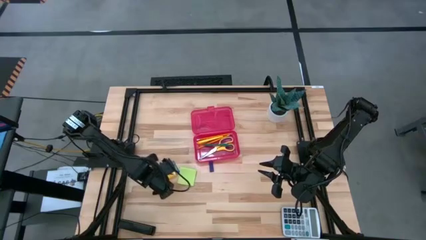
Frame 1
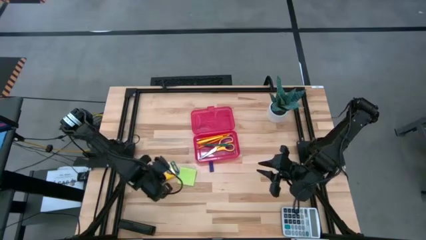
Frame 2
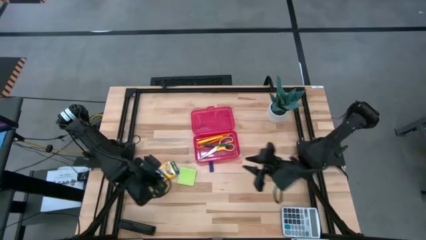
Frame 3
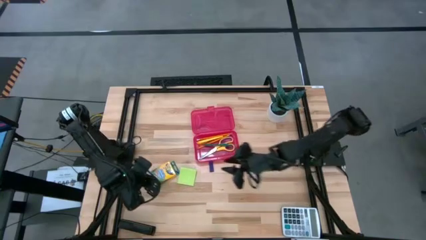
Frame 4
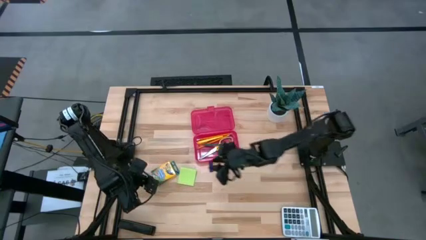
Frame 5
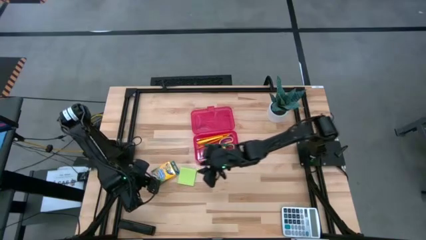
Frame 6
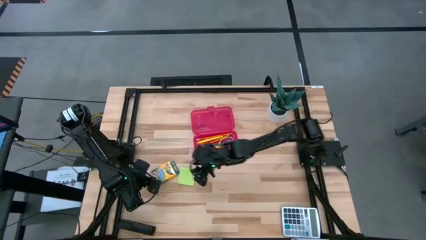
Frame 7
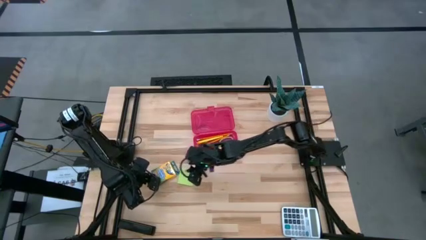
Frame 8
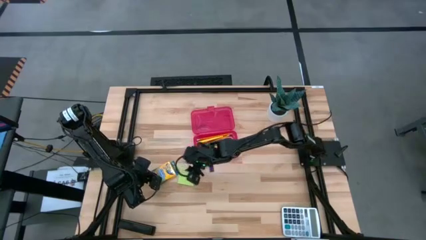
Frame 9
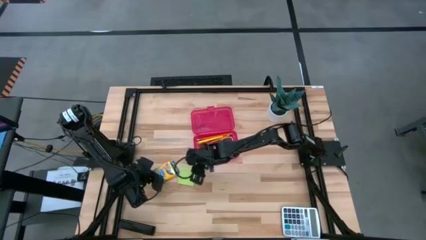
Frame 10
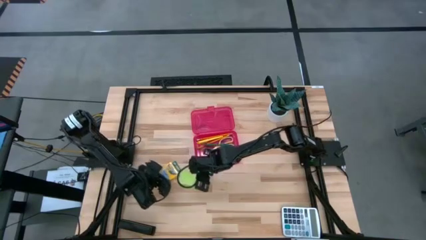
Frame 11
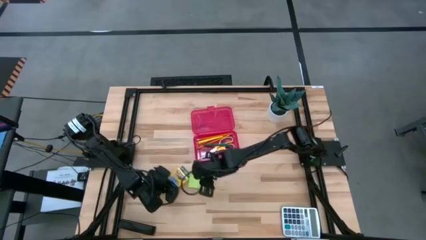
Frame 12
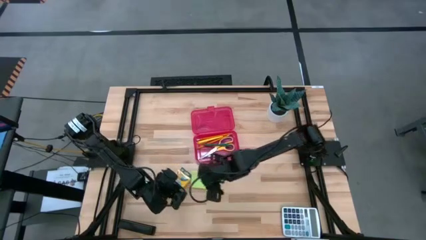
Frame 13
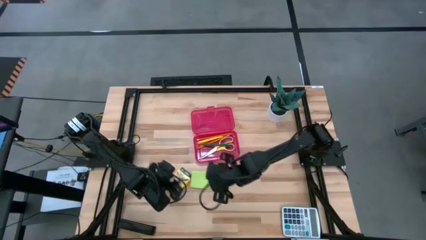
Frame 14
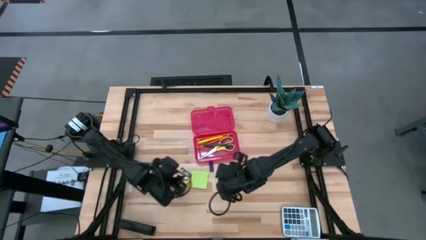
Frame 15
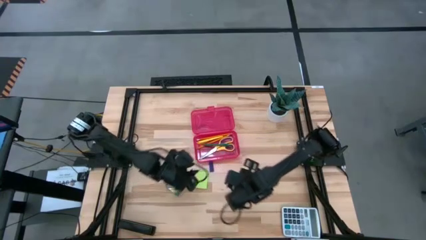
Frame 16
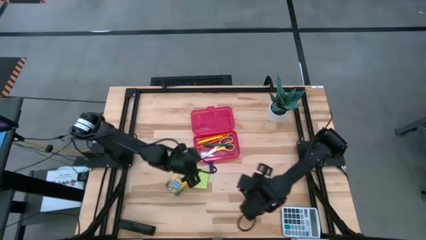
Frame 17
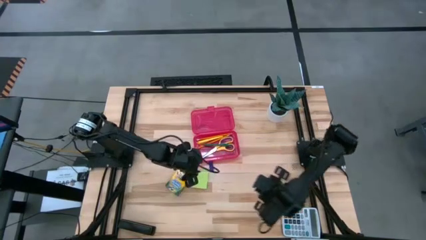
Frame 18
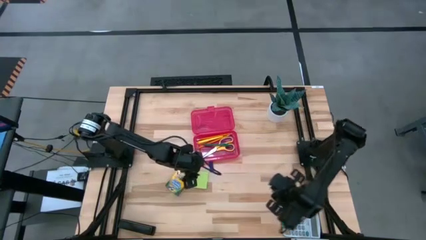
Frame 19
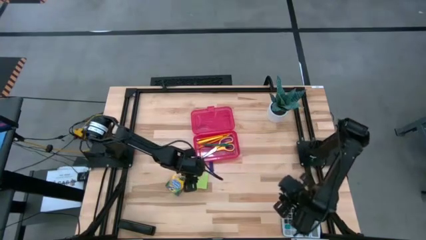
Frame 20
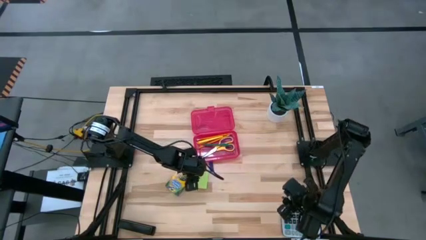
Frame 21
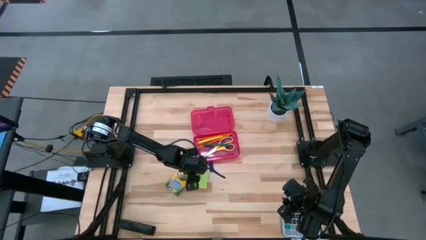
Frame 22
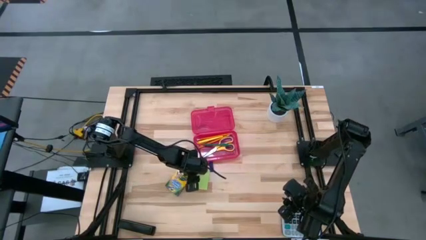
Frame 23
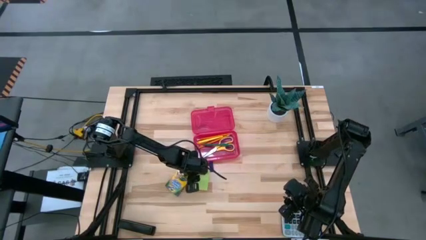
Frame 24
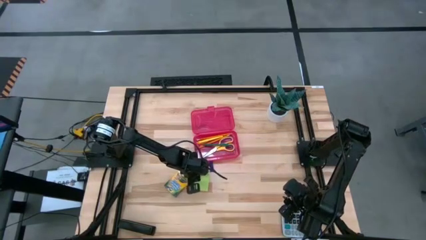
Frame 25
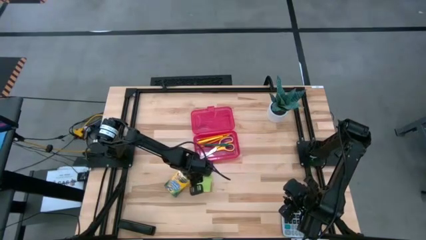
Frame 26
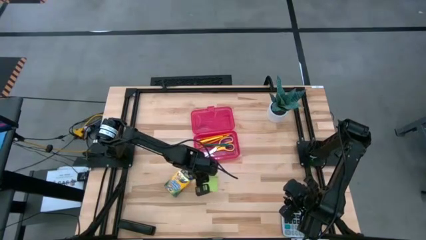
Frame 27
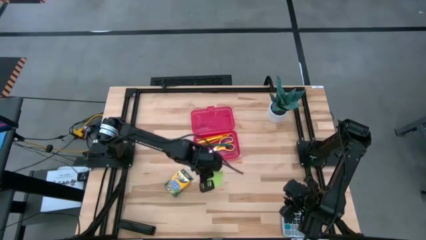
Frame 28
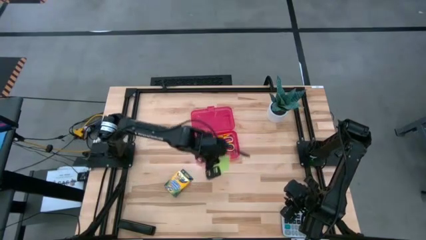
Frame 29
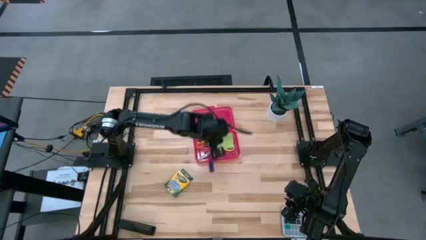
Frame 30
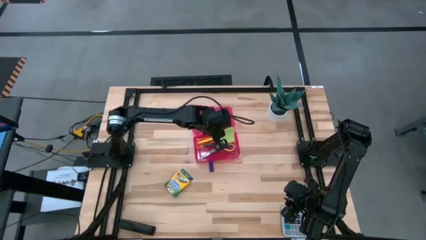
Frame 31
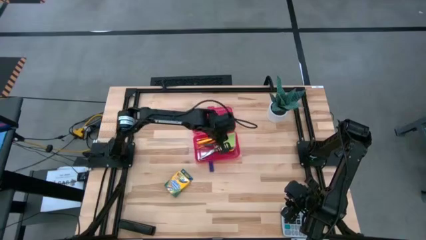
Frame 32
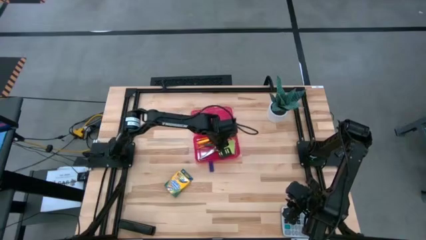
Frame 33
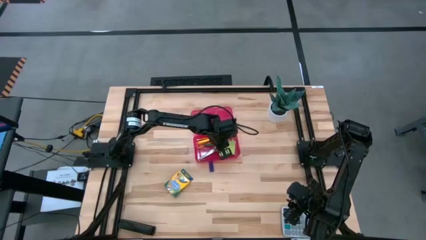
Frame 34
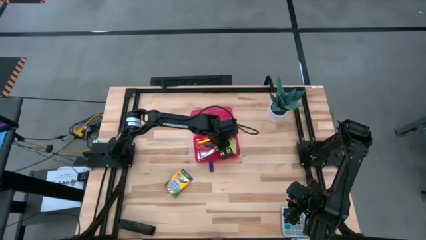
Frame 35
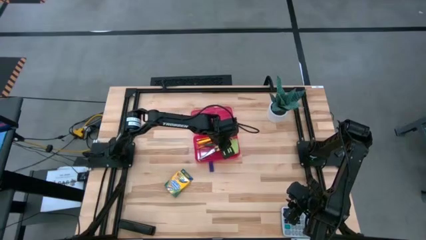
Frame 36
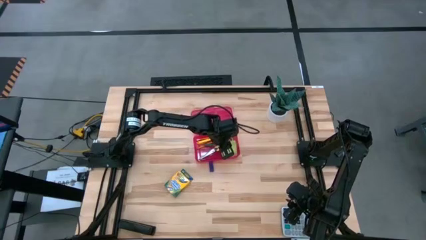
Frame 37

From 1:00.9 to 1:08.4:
Task: Pack school essentials
Put the green sticky note into the supply box

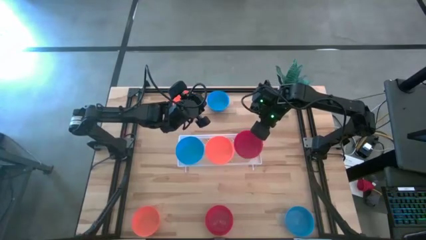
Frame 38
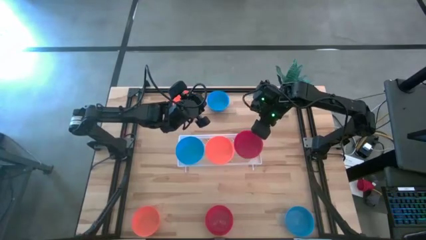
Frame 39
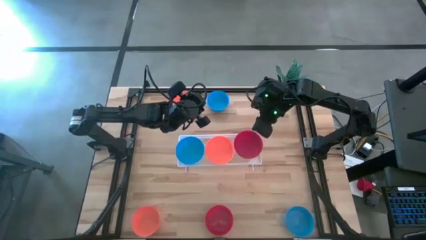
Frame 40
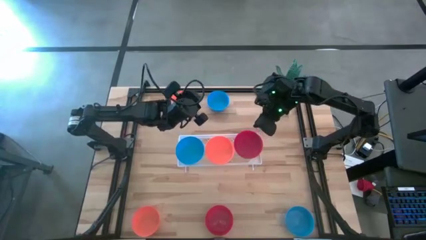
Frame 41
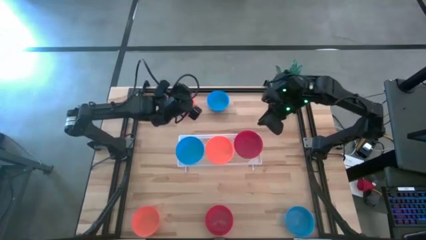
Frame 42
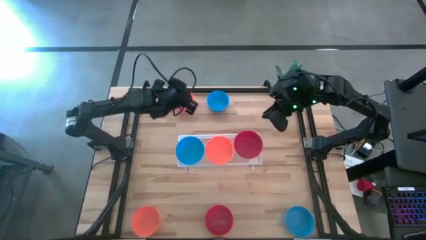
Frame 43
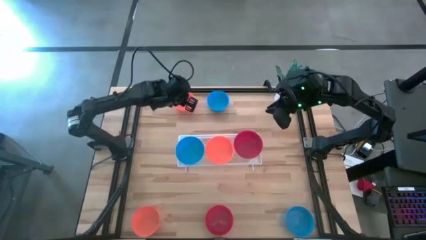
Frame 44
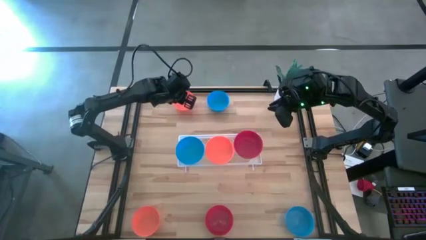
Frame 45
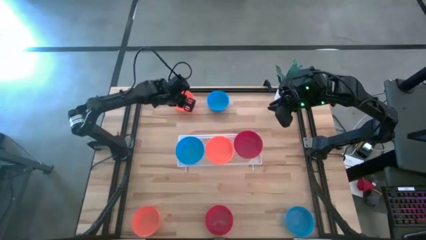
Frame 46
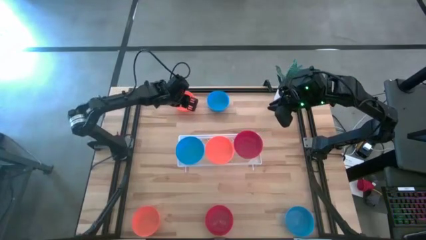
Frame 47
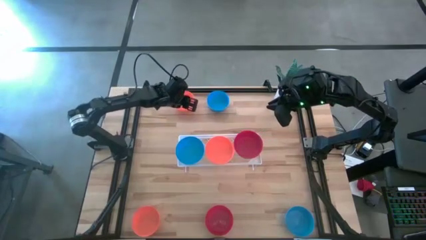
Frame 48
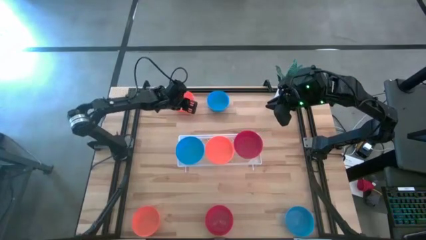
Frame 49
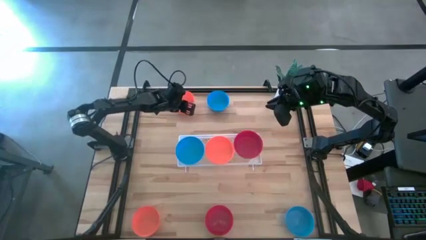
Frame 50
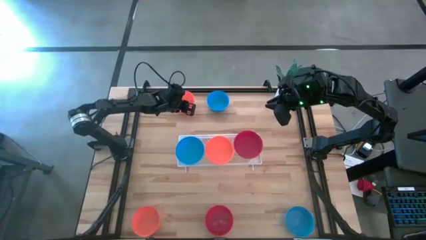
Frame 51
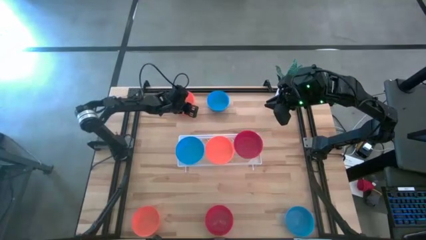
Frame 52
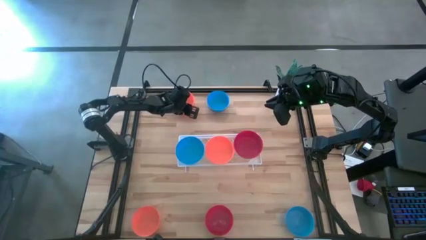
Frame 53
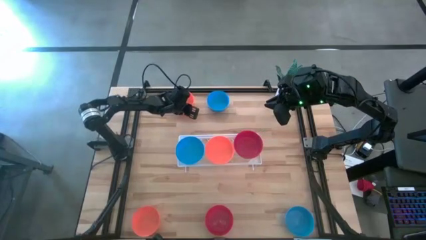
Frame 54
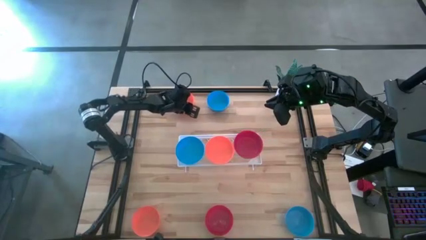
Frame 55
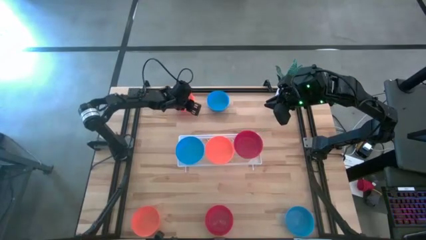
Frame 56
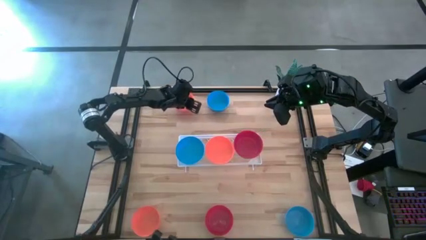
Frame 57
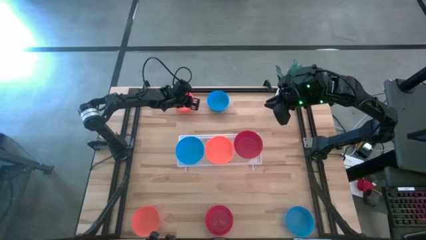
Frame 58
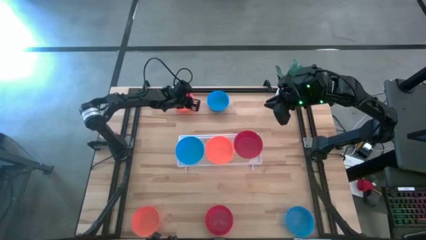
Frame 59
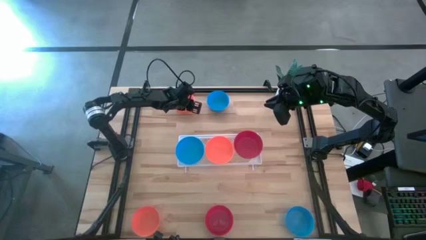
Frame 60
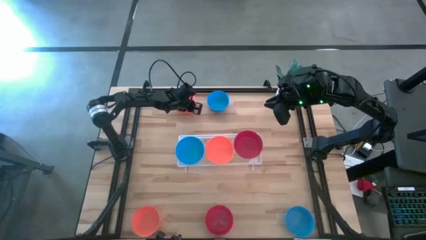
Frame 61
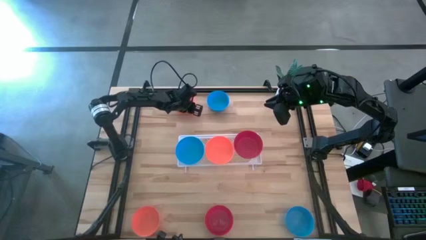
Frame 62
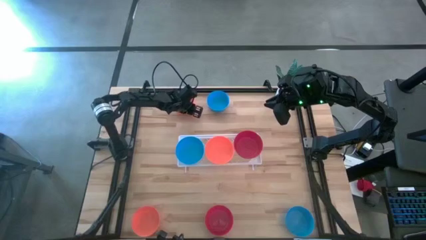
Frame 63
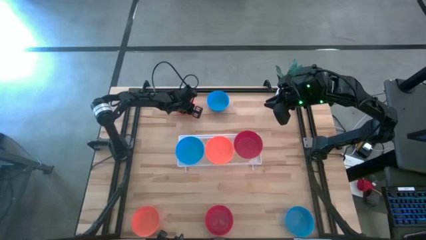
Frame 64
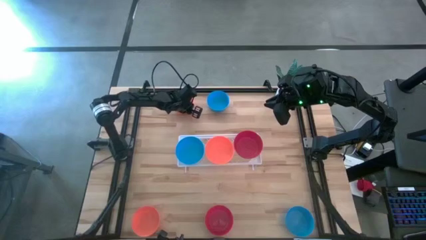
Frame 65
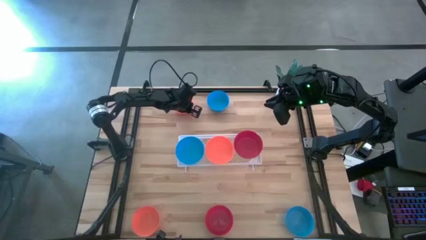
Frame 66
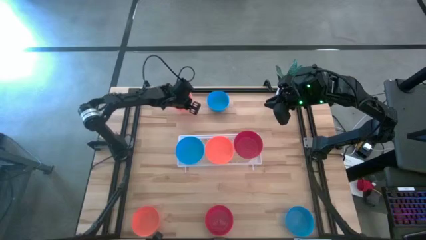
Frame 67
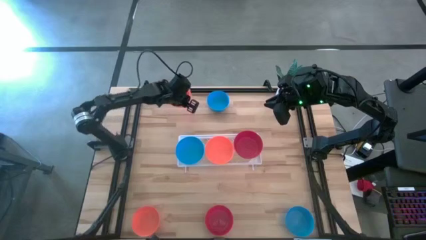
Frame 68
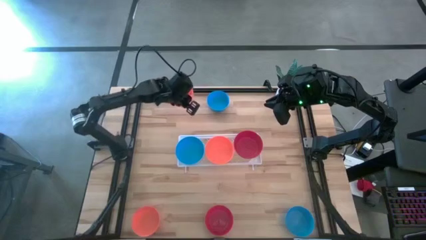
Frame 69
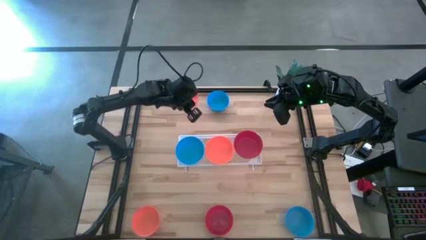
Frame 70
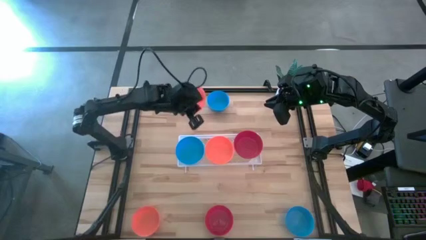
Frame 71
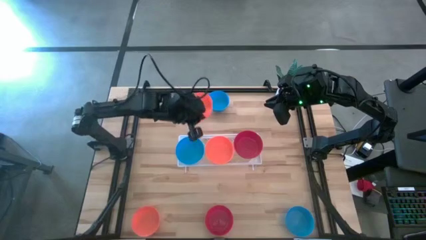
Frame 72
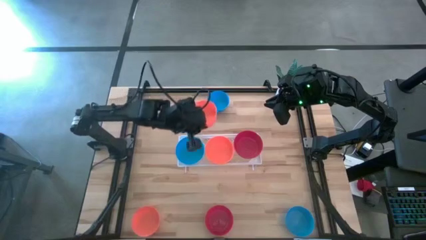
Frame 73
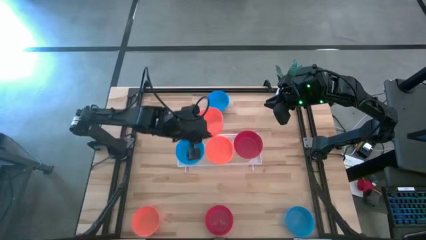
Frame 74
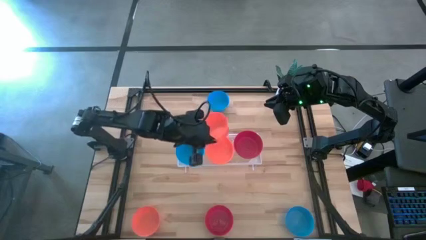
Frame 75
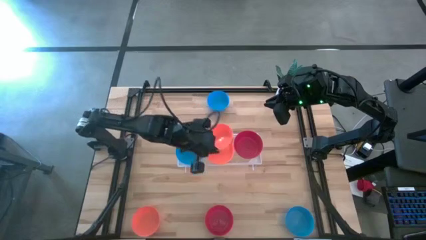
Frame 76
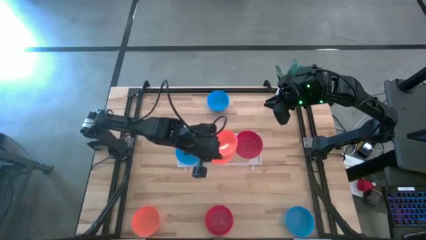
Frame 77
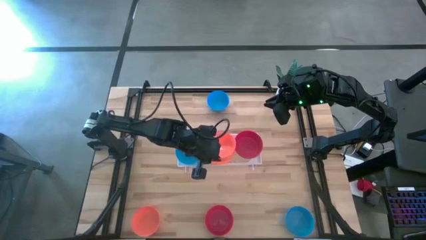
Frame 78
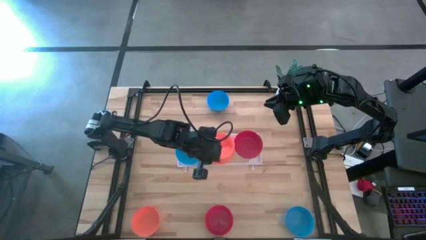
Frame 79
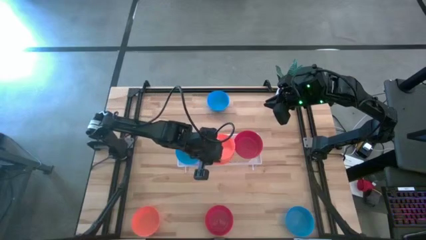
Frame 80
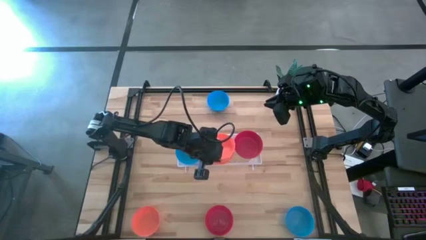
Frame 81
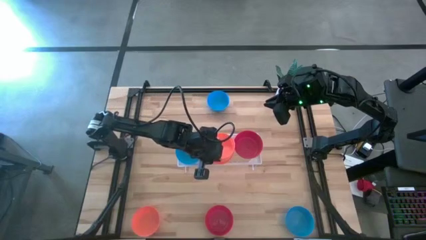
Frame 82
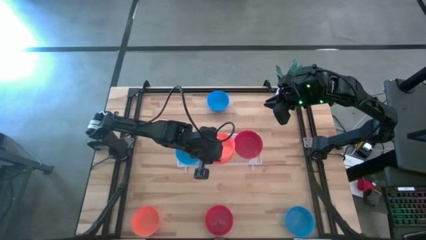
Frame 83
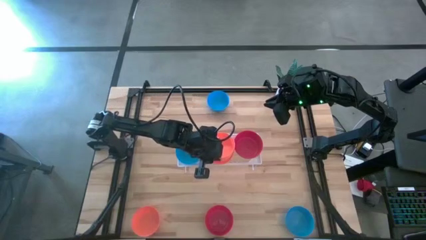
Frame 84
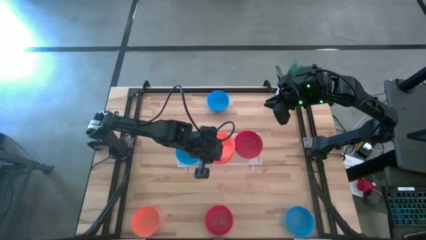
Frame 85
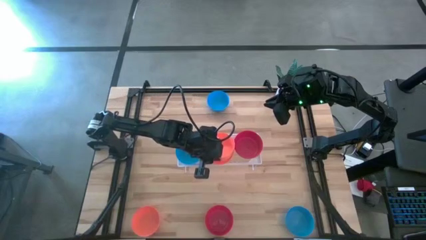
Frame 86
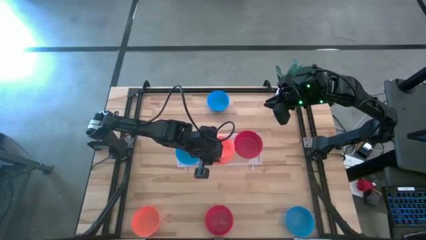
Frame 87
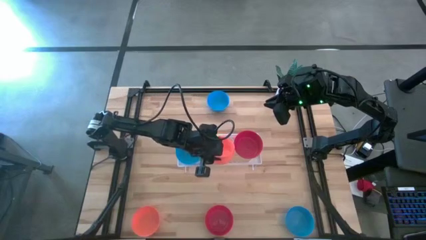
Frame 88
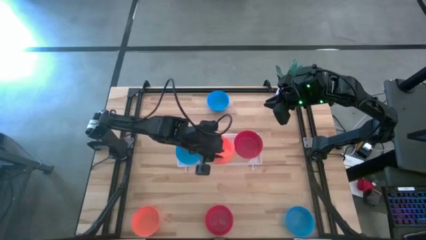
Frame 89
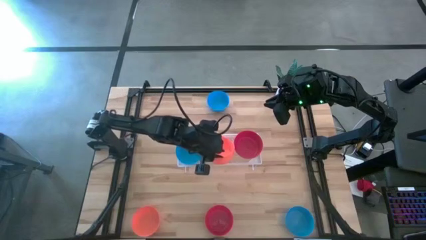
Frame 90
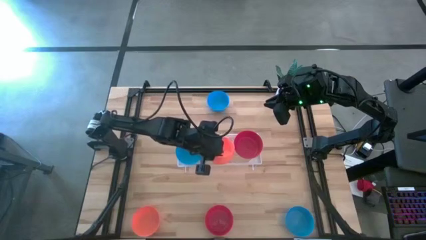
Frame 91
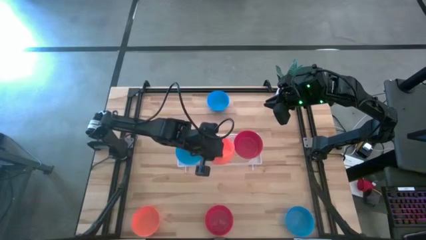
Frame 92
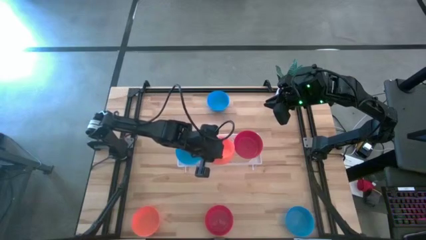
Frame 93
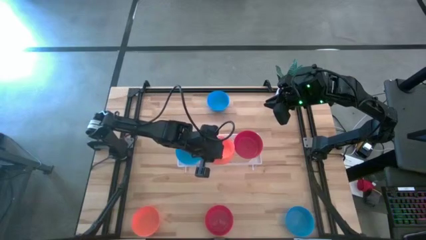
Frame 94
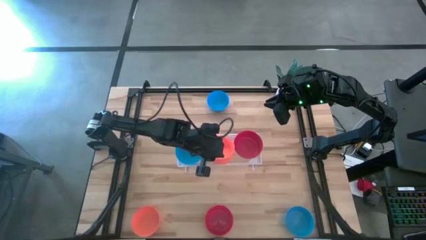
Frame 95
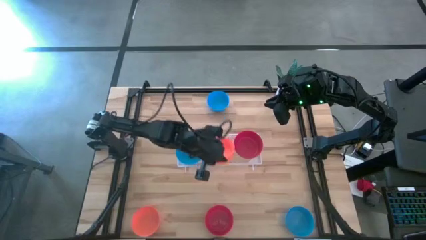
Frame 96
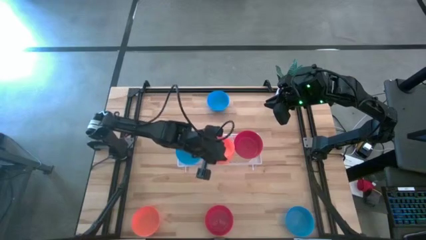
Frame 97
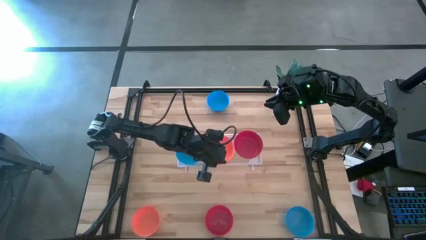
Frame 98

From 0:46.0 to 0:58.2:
Task: Pick & Place Mini bowls
Stack the top orange bowl on the orange bowl on the shelf
